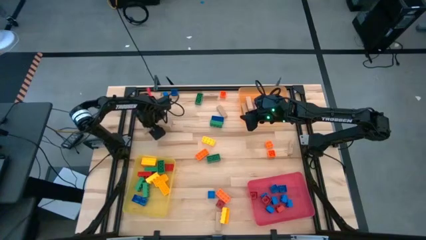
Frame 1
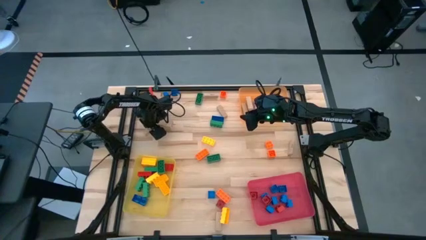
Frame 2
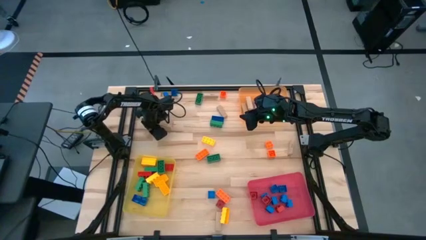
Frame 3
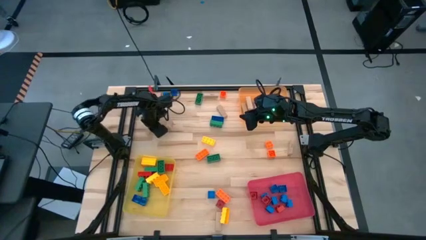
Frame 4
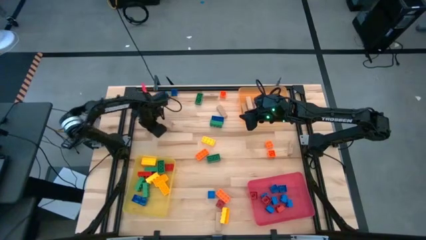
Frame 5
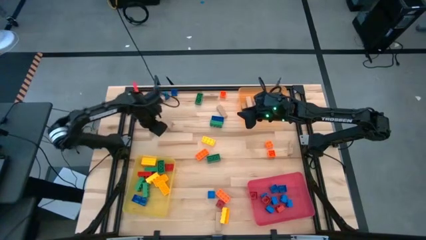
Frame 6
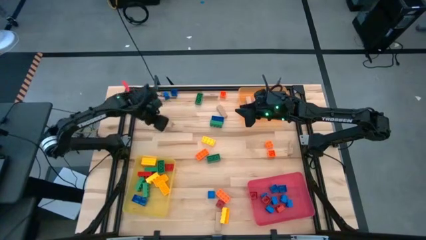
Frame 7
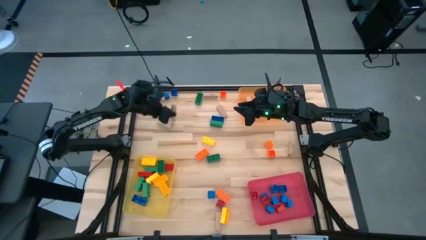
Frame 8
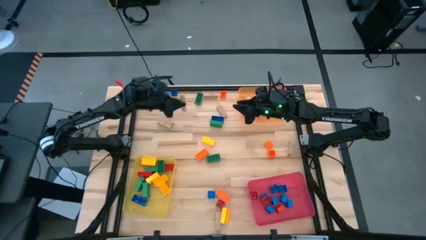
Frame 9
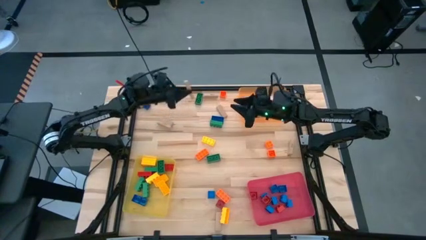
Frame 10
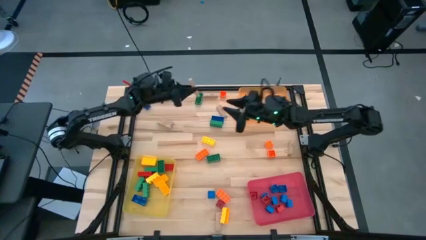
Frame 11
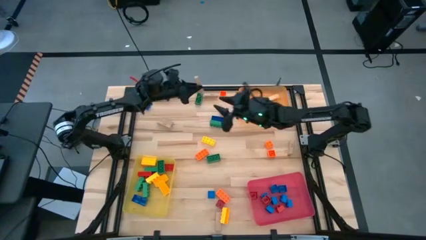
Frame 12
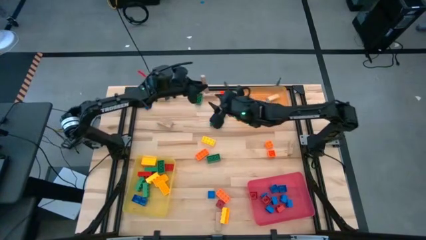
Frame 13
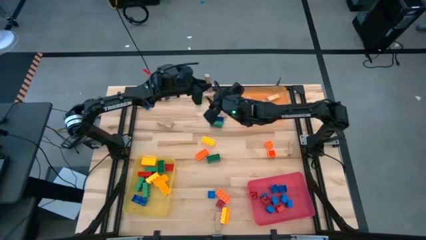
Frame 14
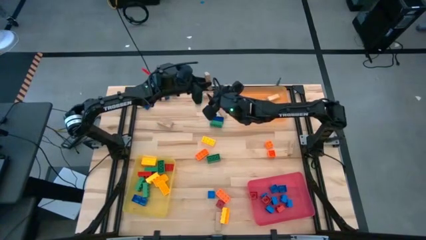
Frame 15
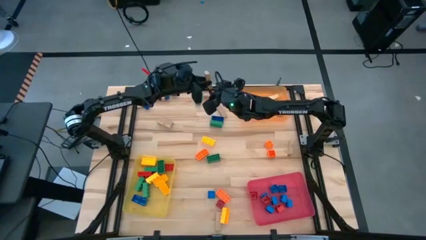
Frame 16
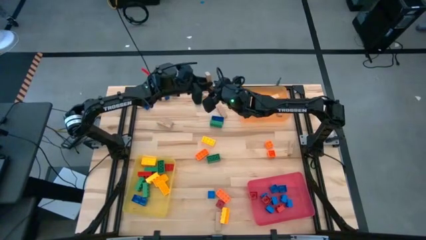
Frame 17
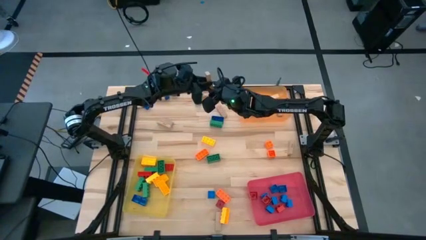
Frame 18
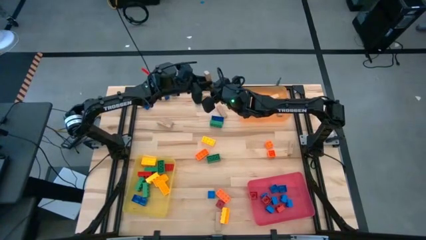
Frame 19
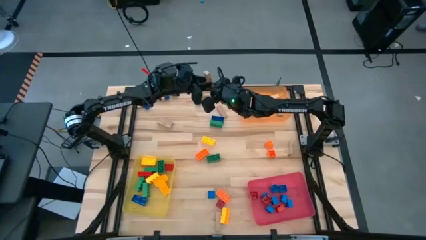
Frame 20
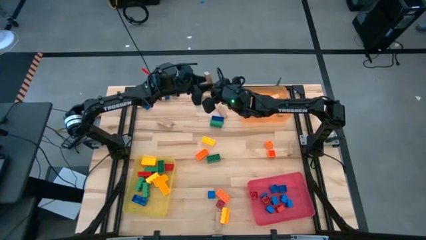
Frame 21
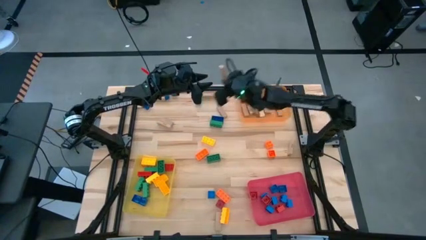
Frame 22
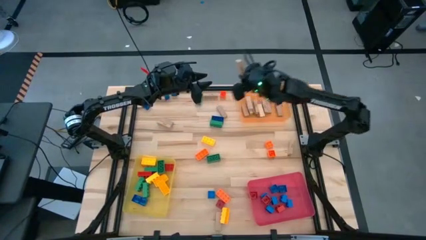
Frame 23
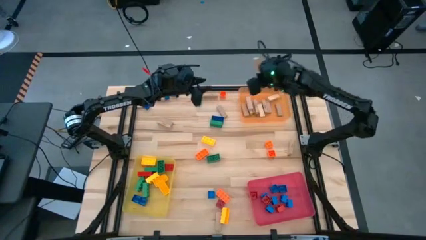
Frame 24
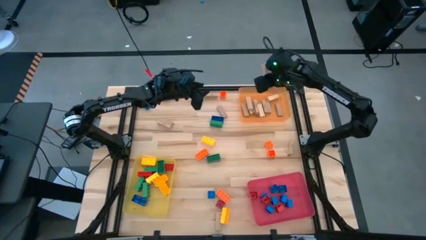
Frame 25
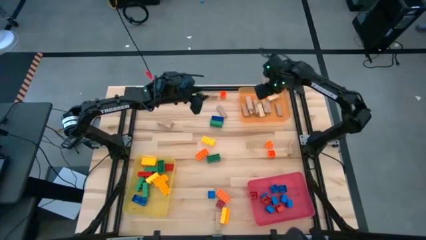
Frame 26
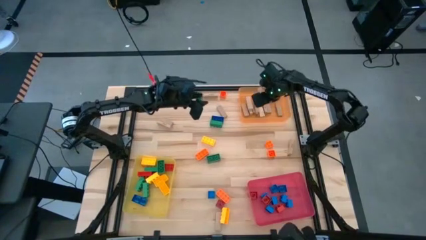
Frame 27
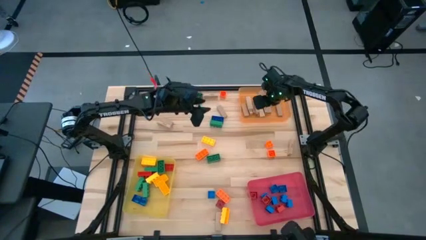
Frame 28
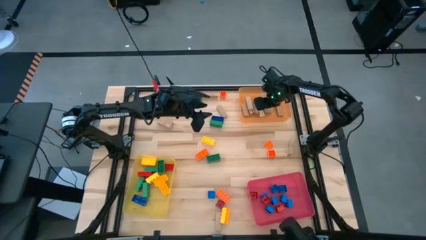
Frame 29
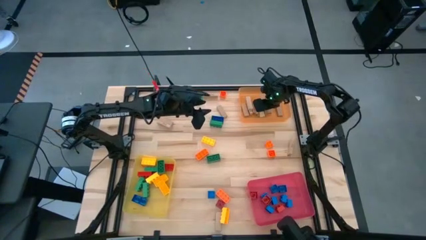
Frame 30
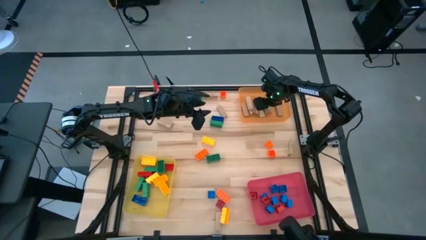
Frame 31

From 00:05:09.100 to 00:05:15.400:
Task: Sort blocks by size
Put the brown block into the orange bin

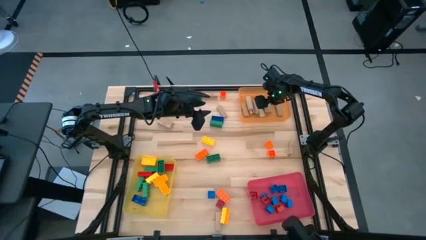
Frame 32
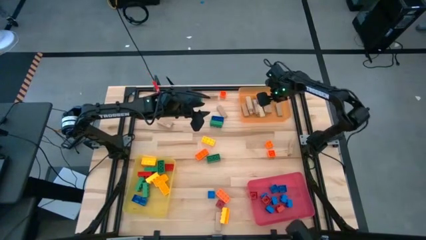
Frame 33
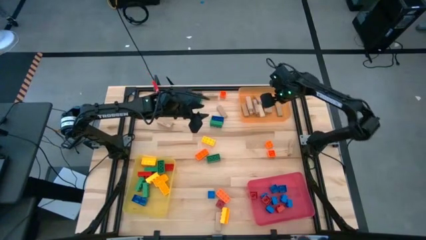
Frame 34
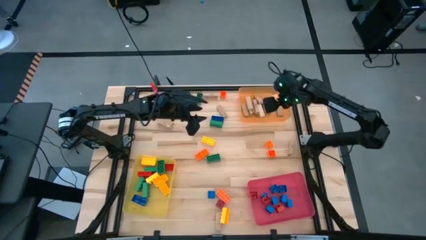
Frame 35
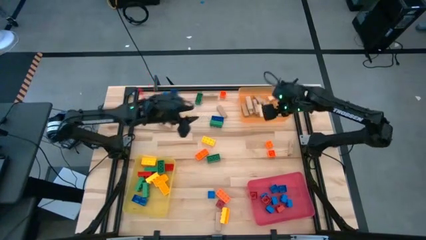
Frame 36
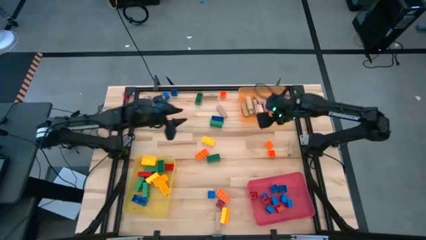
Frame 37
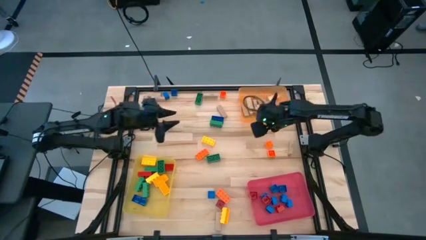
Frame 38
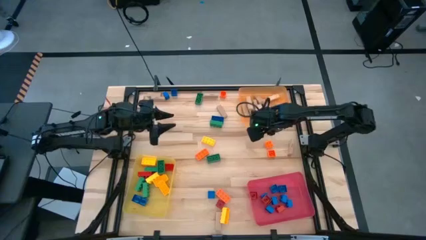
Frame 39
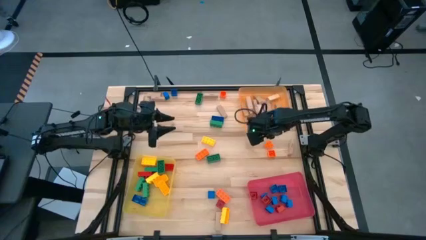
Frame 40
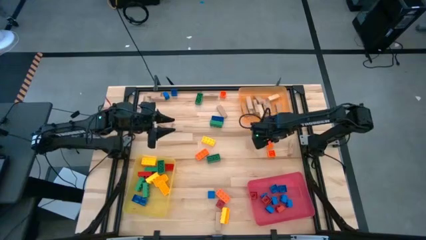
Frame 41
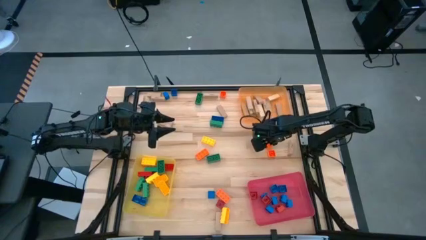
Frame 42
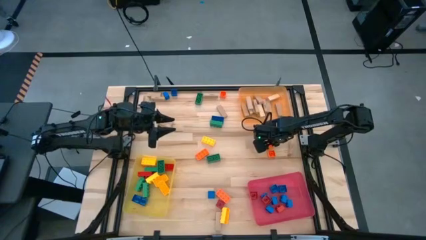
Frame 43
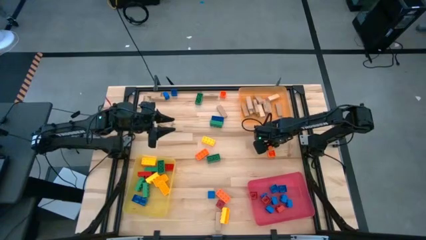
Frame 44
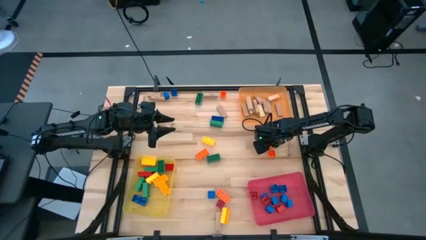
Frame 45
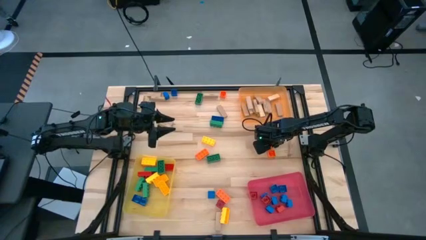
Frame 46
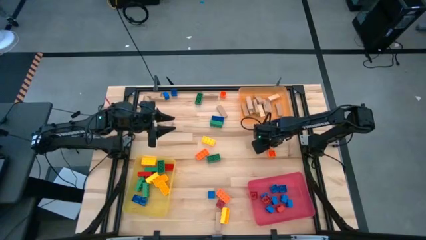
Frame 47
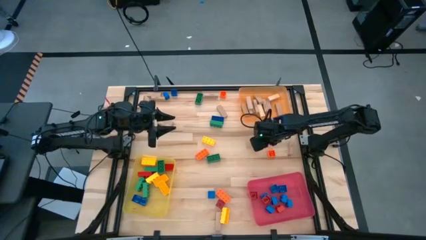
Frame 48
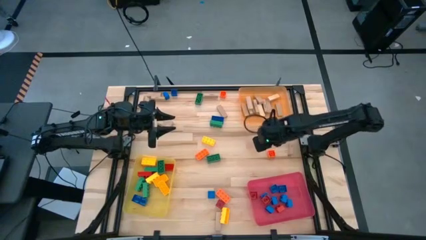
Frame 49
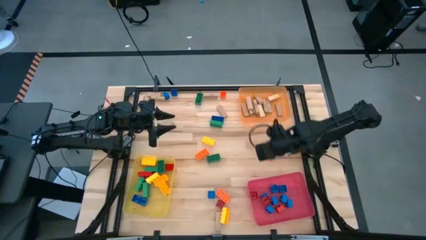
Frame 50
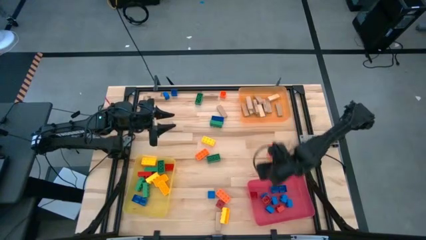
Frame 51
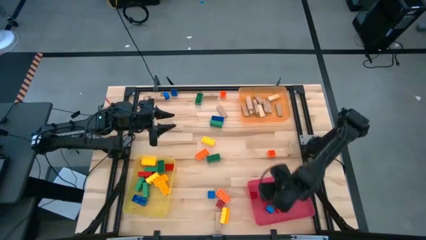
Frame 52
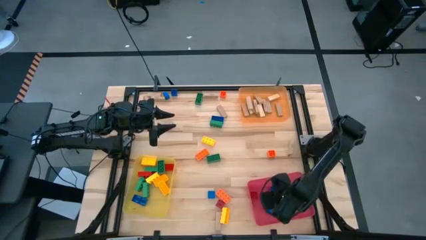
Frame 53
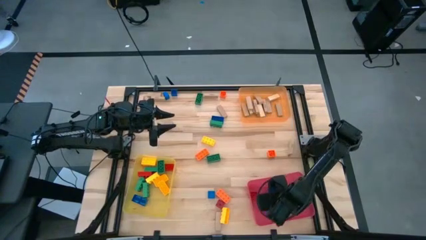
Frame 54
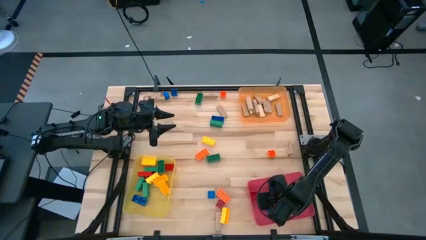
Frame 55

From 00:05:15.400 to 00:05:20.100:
Put the small orange game piece into the red bin

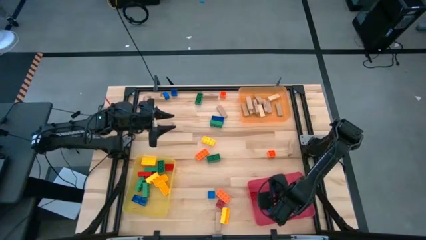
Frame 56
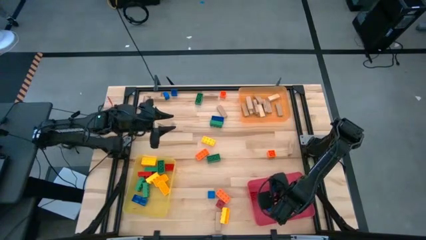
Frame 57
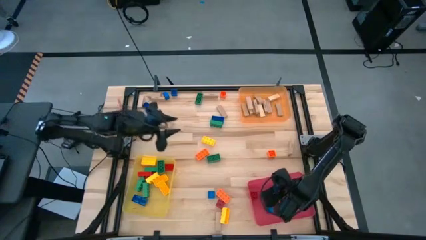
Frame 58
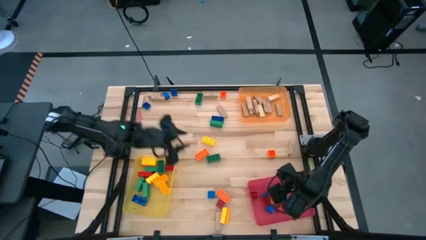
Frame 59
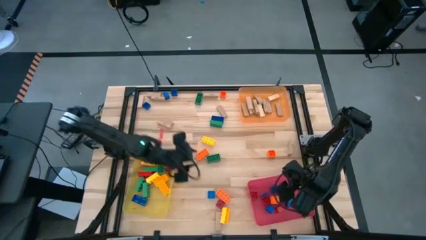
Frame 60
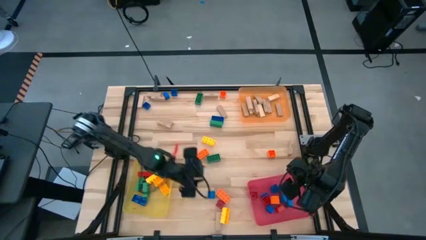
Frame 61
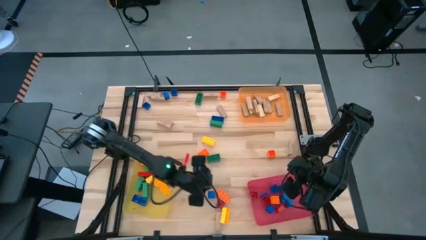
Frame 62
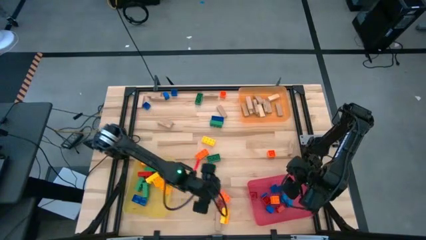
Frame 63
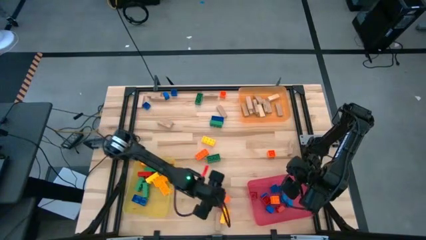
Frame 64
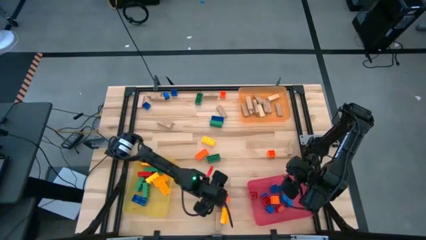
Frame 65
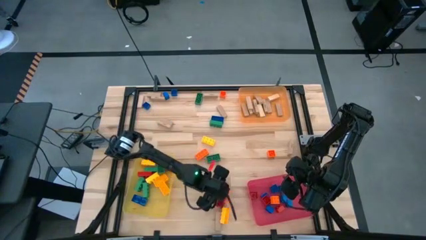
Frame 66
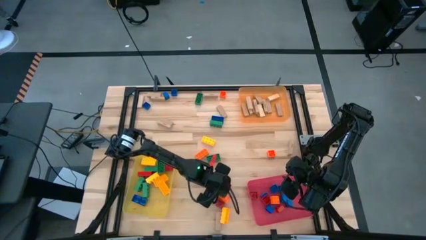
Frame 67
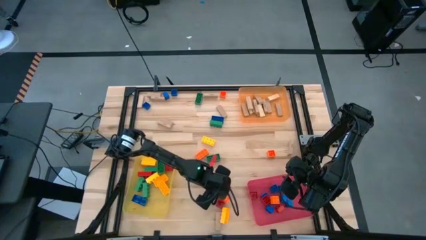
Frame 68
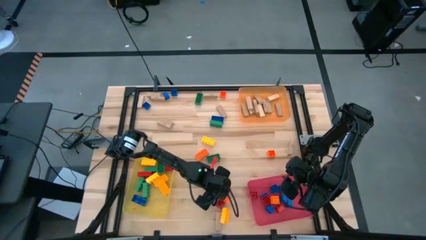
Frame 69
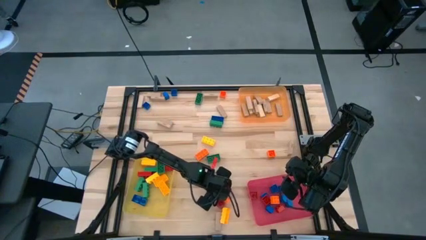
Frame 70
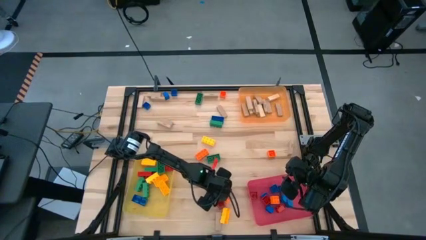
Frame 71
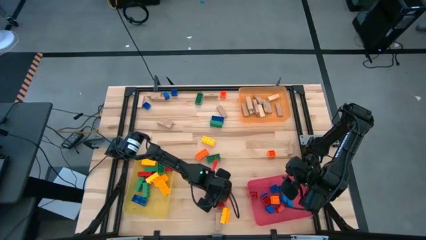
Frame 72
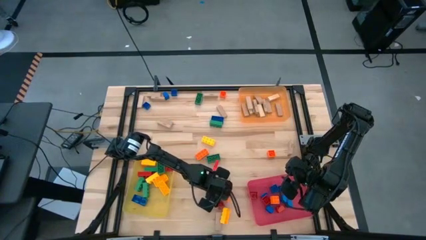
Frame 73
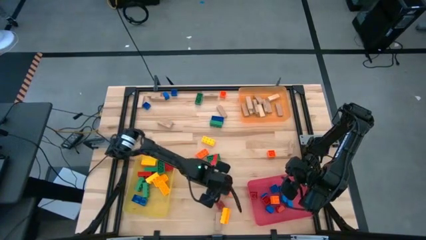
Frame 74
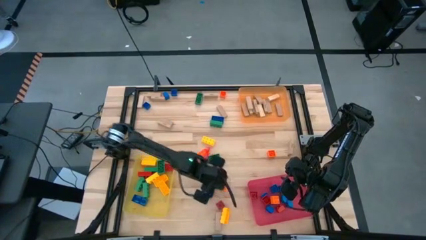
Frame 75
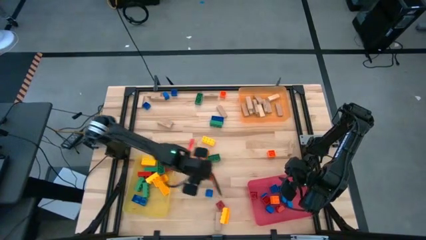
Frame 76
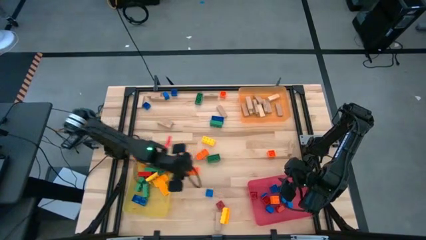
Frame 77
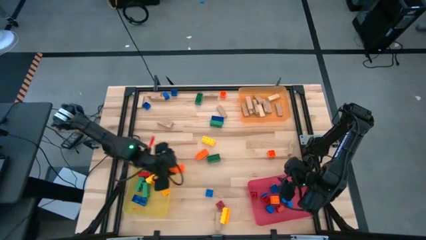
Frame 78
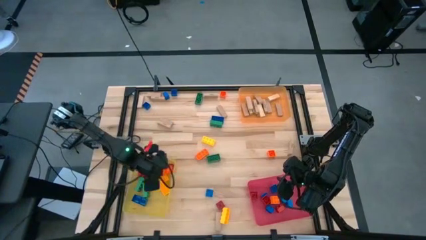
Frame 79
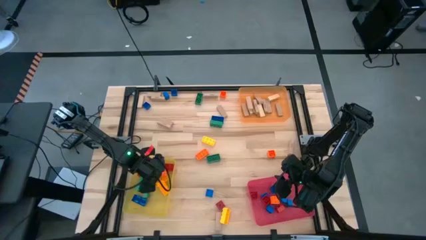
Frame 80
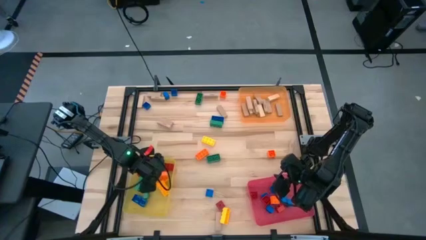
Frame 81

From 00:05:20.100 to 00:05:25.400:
Put the large orange game piece into the yellow bin
